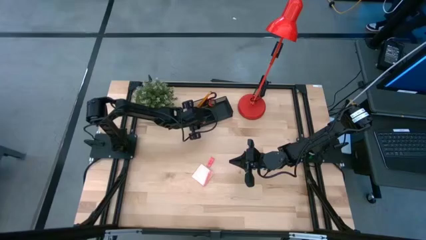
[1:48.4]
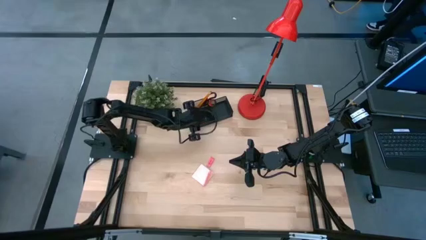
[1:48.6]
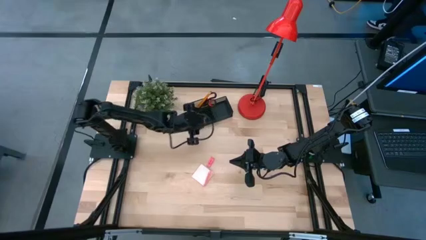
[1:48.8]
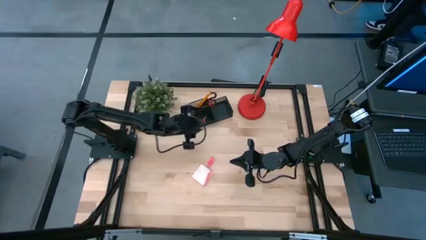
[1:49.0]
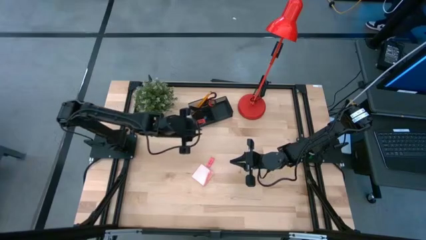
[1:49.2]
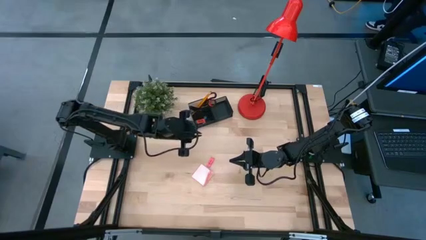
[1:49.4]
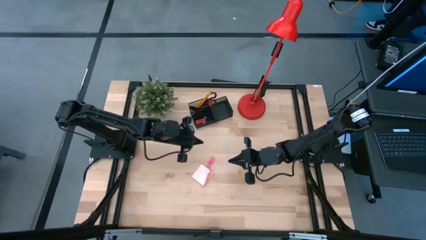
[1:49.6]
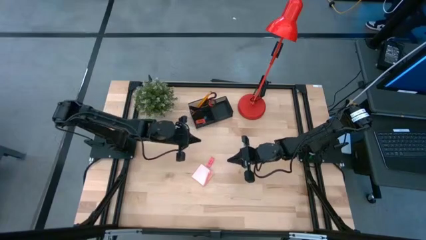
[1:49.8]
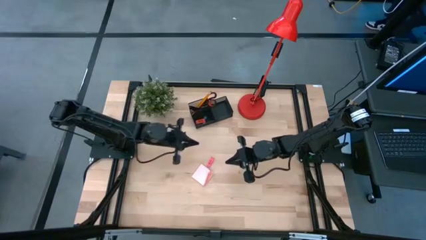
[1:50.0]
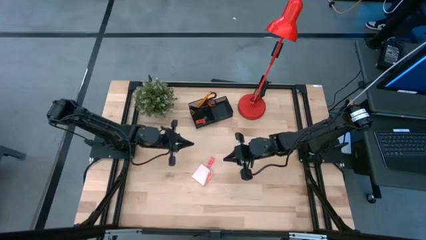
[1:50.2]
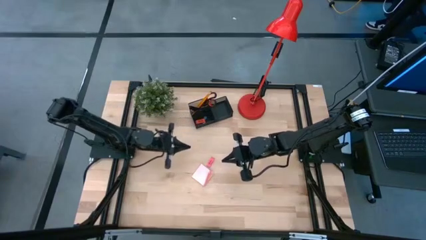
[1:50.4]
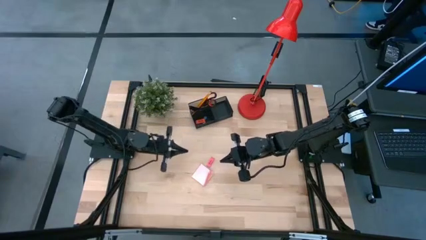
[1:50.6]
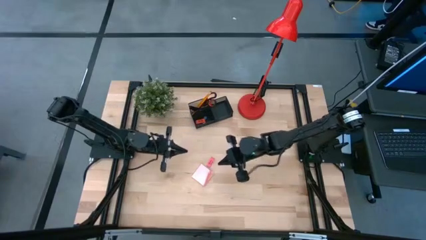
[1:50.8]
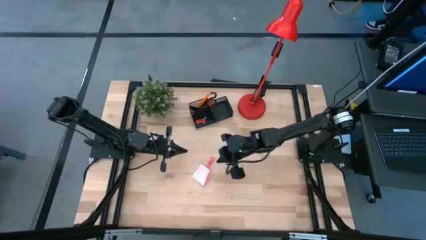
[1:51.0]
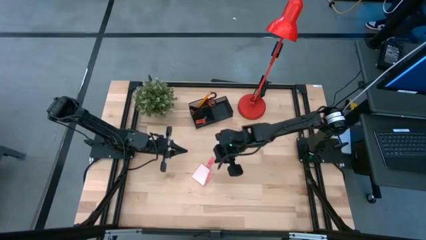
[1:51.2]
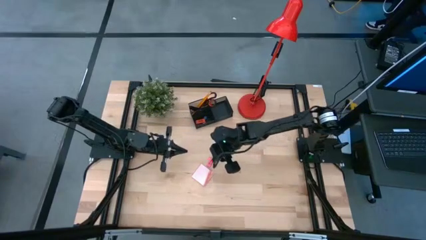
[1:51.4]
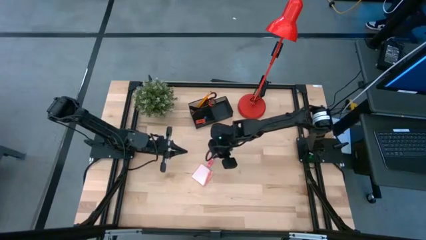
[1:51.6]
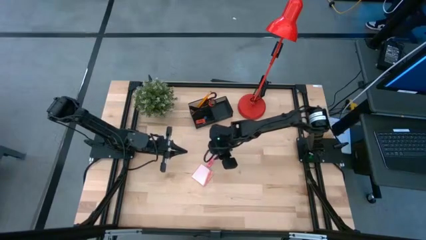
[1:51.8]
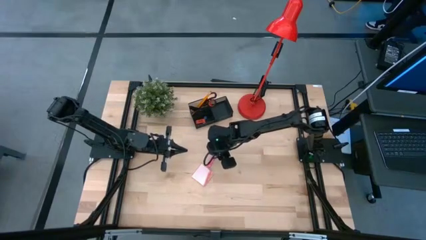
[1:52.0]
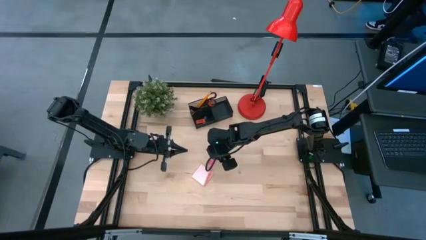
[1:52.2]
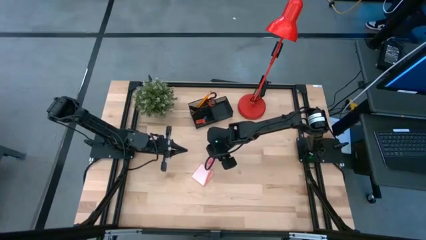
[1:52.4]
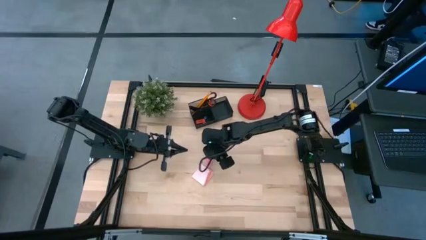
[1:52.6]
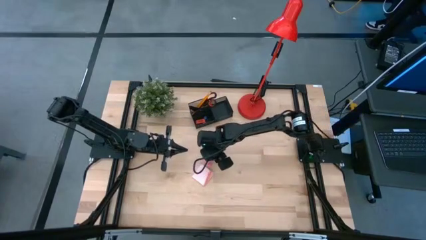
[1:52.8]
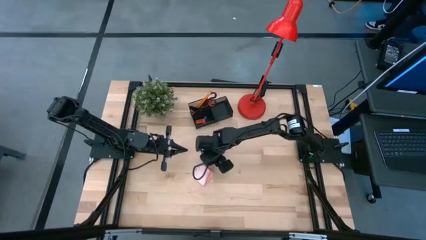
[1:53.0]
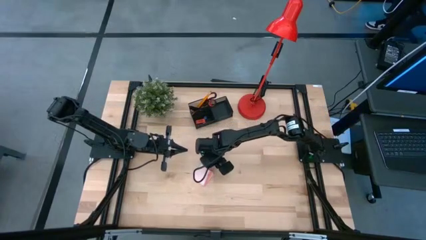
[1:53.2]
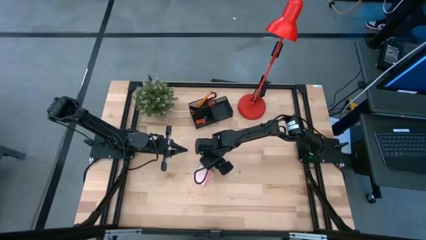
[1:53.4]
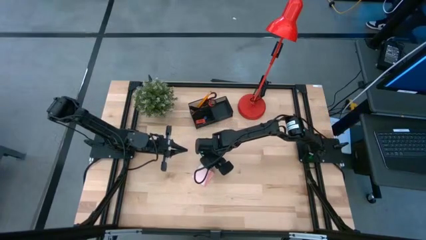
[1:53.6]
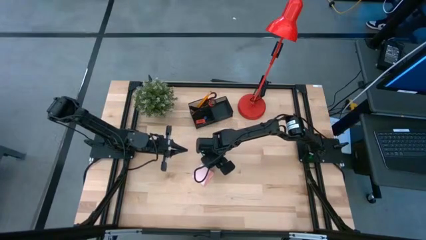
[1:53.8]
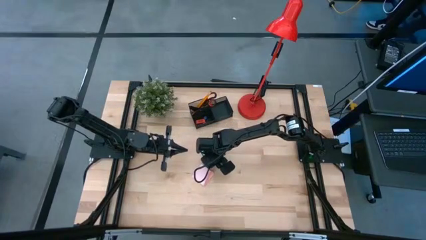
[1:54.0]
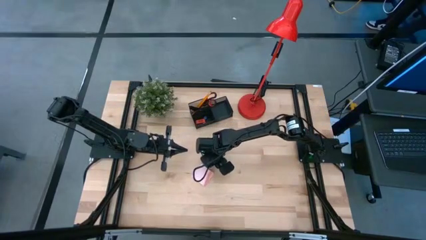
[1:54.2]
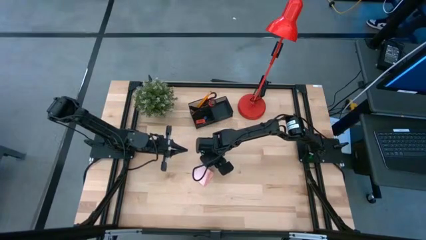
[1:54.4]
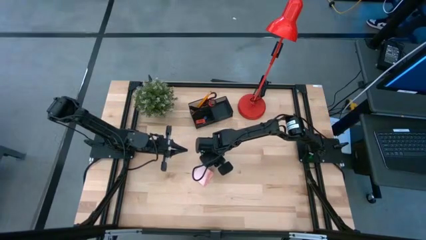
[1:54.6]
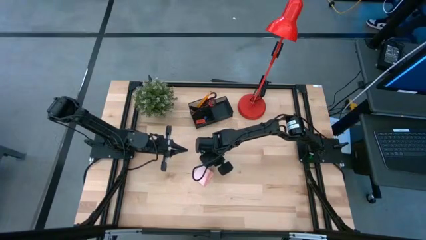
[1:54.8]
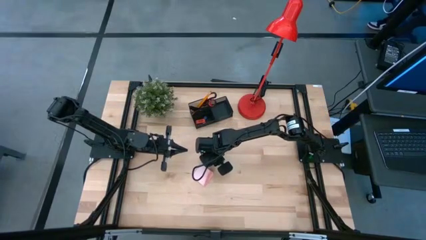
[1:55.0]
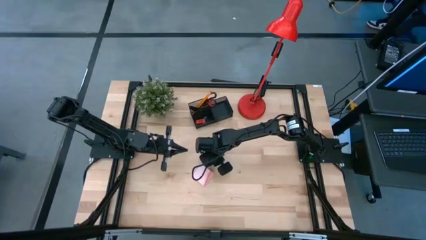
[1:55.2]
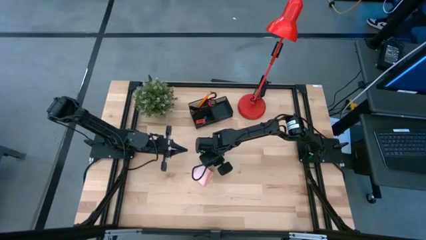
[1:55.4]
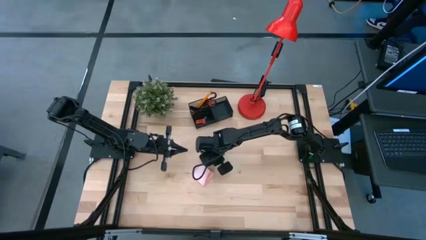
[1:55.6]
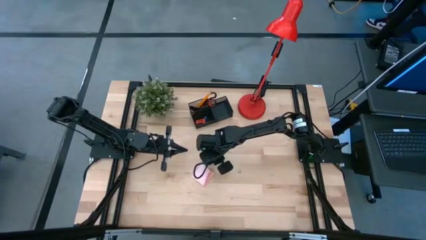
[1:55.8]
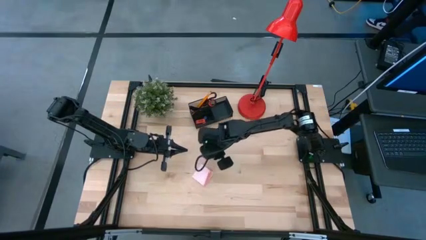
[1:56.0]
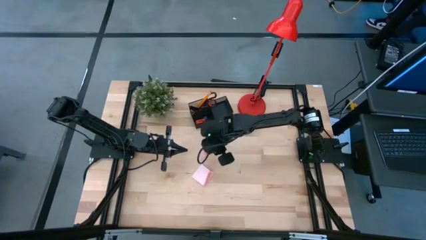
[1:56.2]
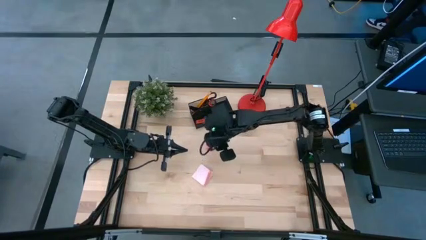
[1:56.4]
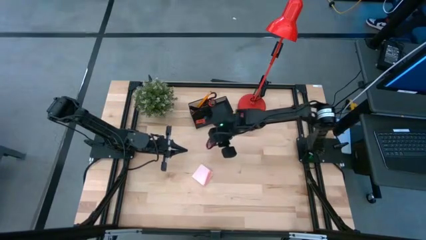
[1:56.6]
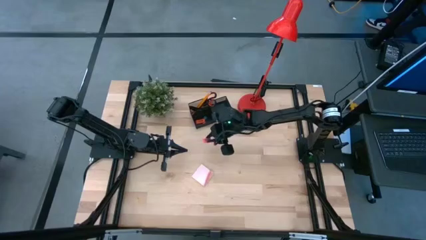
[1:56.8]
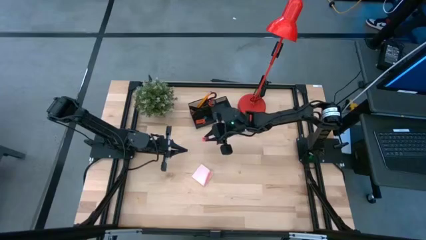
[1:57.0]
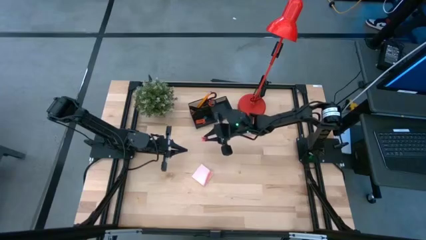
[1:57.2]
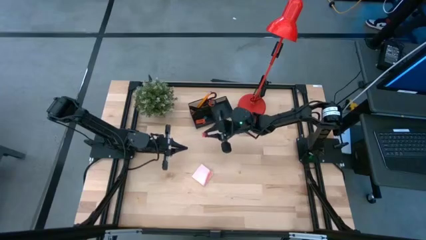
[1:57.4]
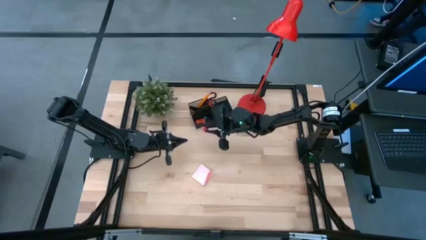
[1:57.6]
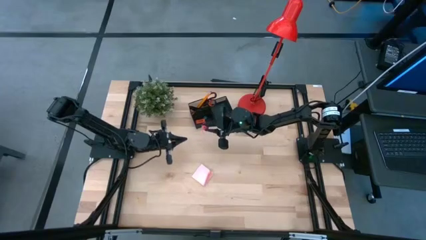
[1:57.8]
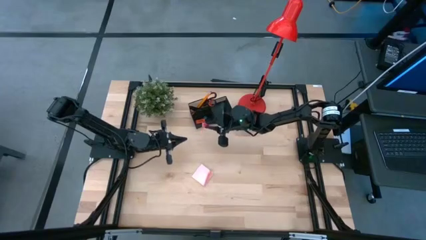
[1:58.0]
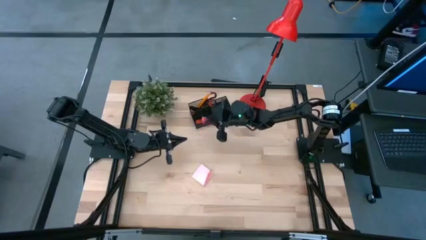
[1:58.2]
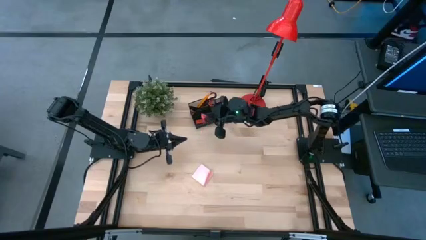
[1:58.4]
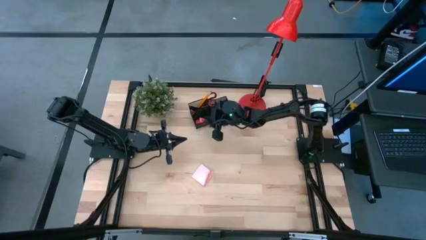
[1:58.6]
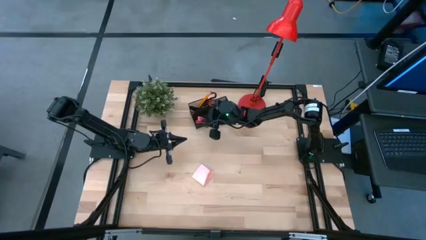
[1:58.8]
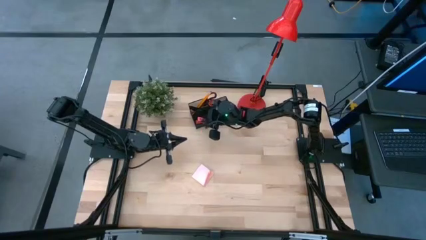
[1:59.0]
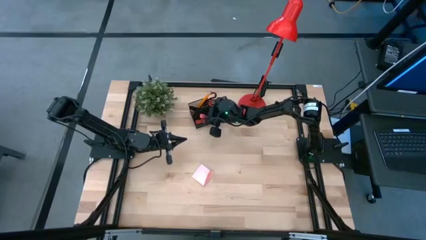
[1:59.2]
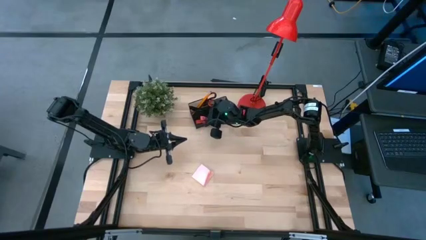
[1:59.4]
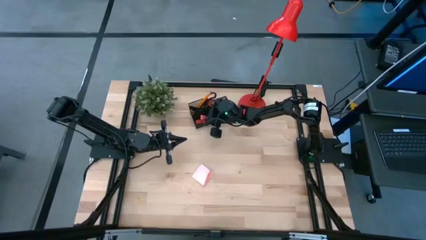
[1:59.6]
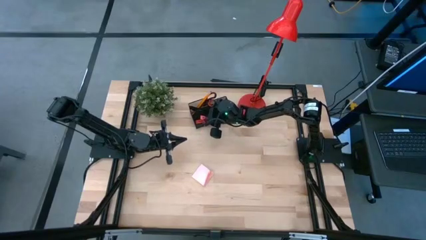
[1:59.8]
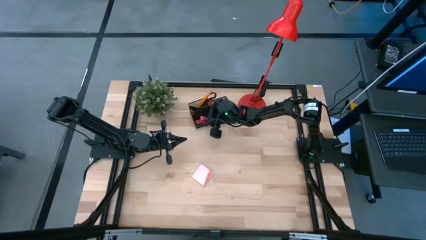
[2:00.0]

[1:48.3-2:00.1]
Task: Pick and place office supplies into organizer
Put the pink eraser into the black desk organizer

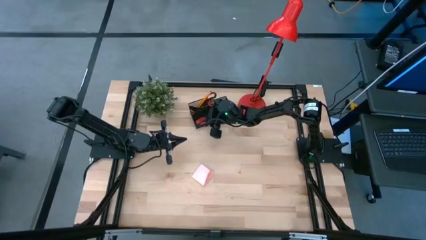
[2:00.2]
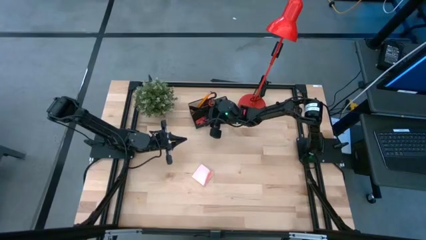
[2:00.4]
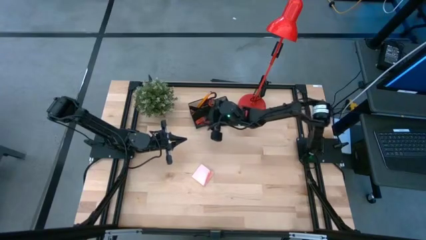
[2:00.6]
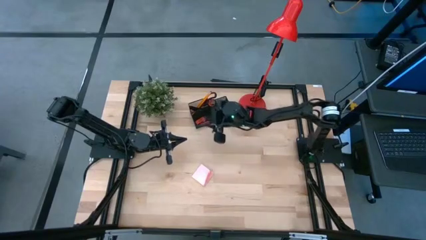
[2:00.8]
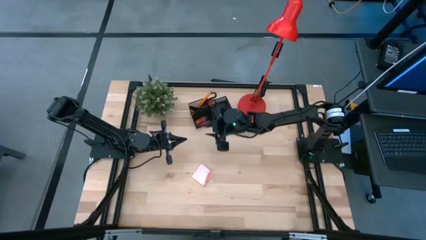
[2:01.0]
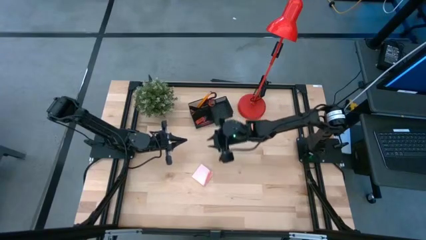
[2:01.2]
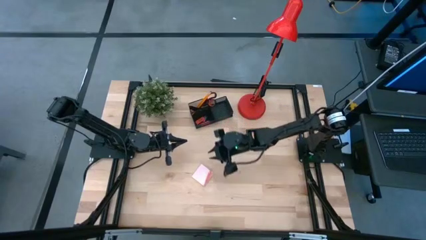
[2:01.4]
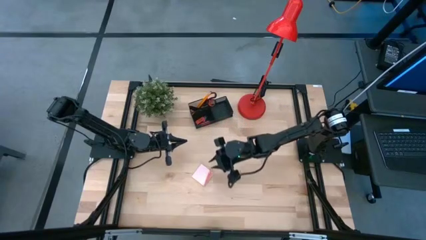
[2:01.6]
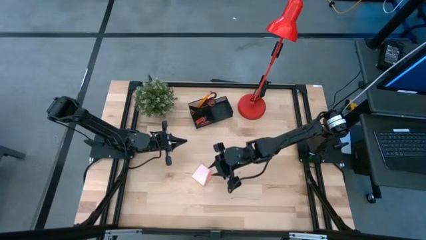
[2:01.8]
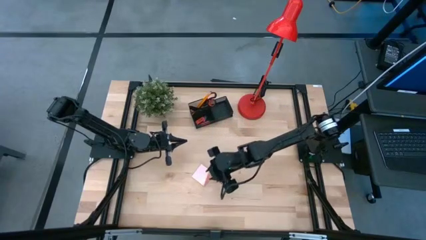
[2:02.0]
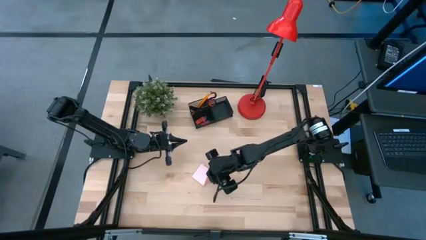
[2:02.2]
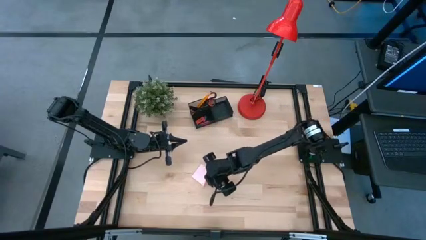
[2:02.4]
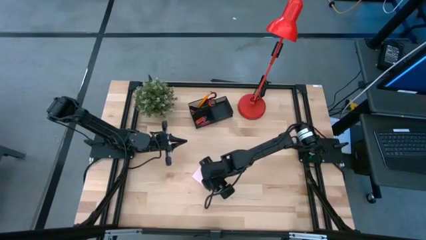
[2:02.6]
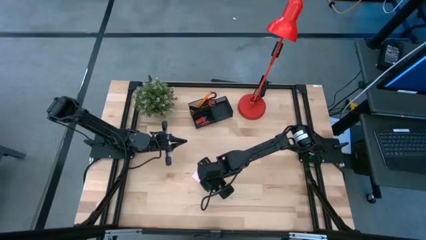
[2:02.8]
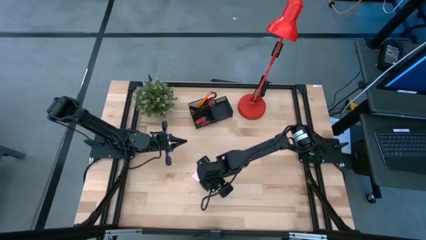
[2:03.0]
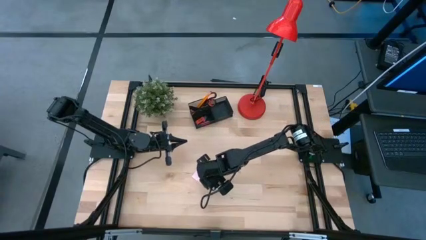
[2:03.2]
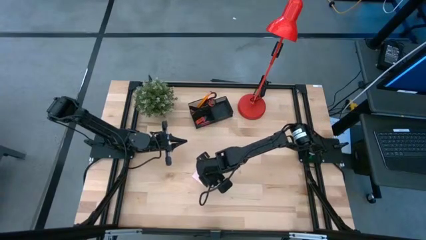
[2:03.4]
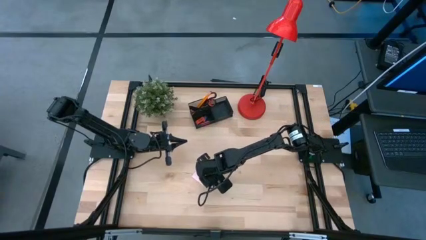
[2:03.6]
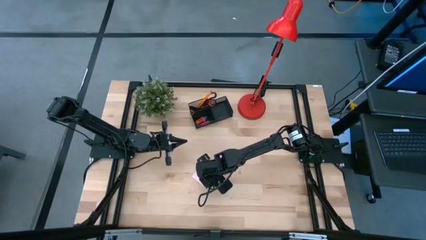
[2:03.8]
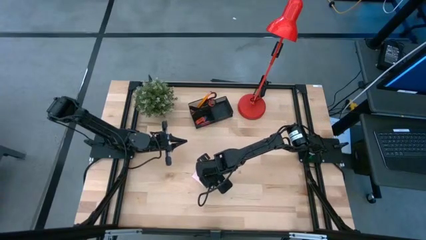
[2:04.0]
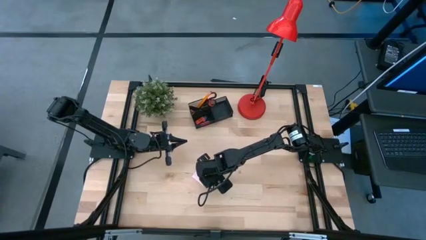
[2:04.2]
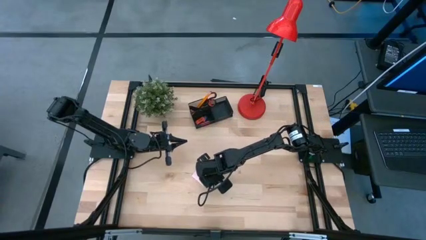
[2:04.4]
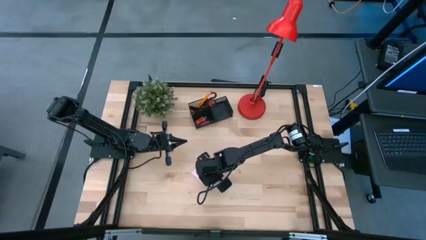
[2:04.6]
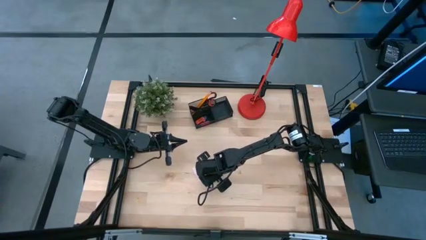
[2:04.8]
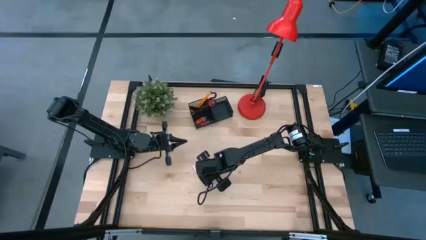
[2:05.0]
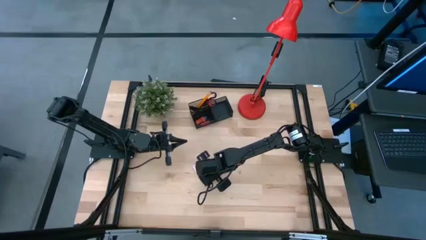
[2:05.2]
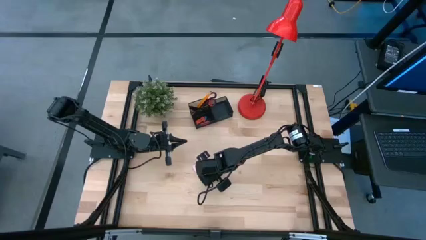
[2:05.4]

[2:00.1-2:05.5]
Put the pink sticky notes into the black desk organizer
